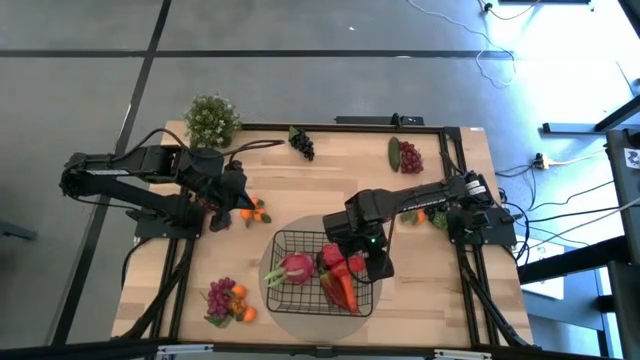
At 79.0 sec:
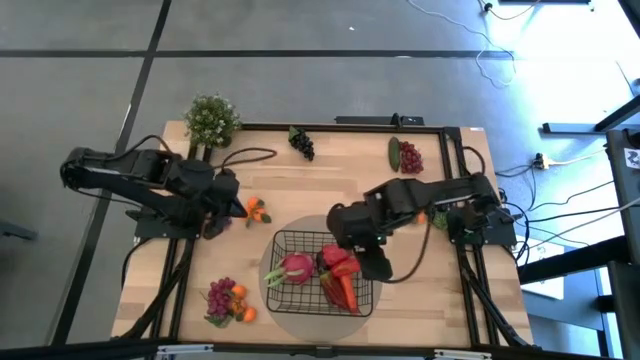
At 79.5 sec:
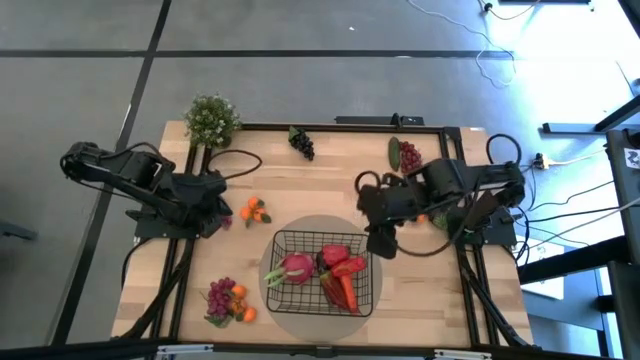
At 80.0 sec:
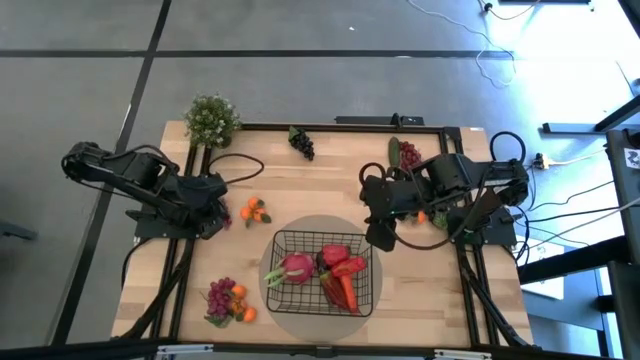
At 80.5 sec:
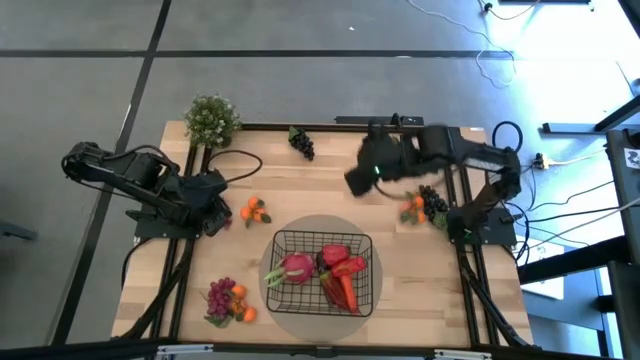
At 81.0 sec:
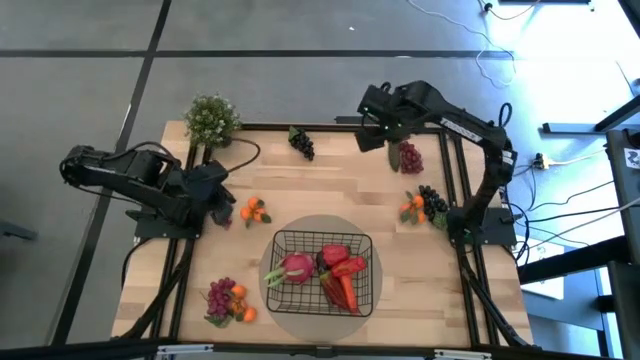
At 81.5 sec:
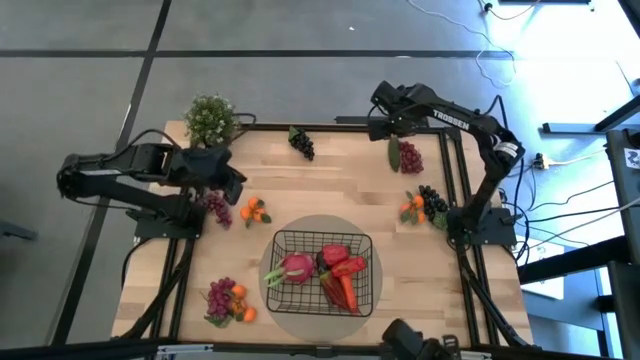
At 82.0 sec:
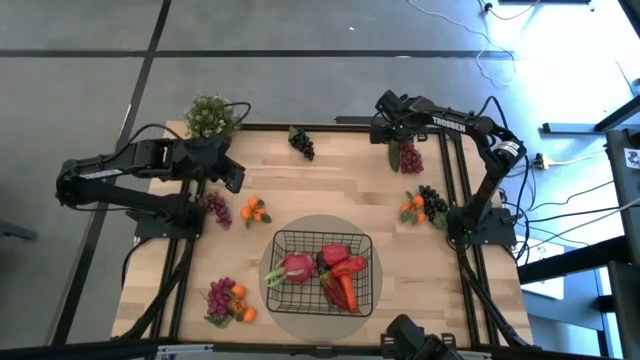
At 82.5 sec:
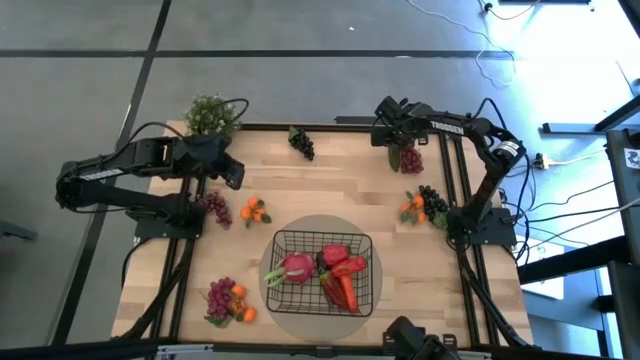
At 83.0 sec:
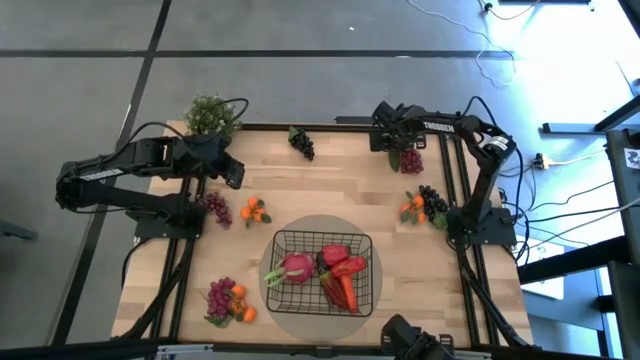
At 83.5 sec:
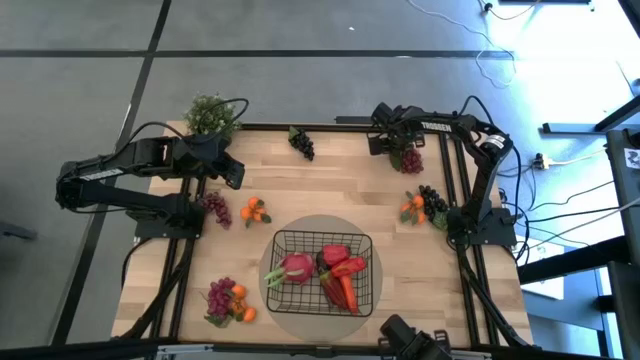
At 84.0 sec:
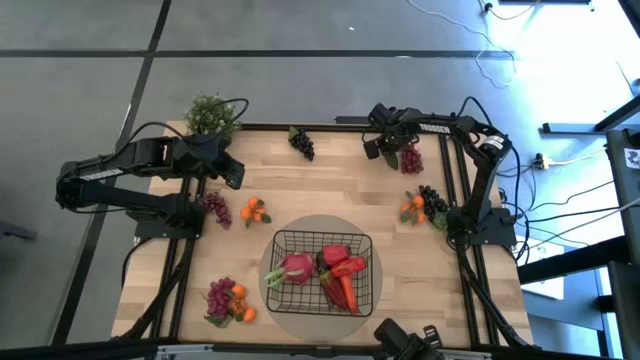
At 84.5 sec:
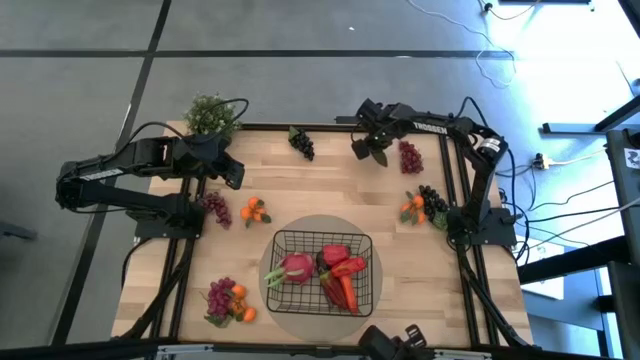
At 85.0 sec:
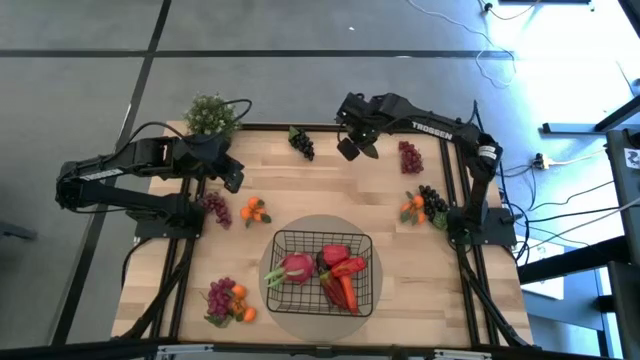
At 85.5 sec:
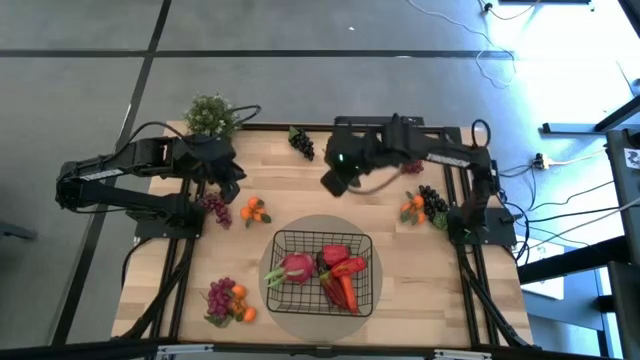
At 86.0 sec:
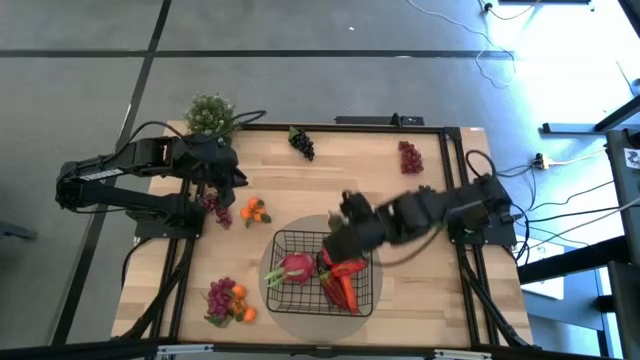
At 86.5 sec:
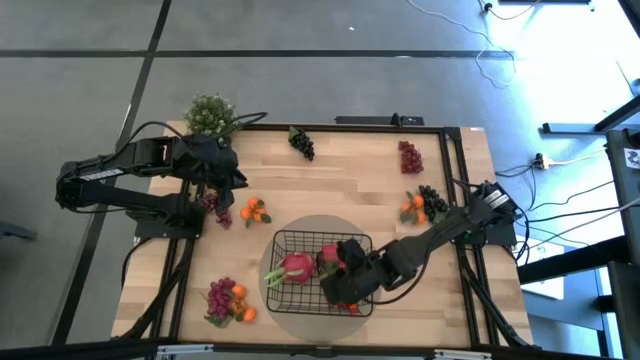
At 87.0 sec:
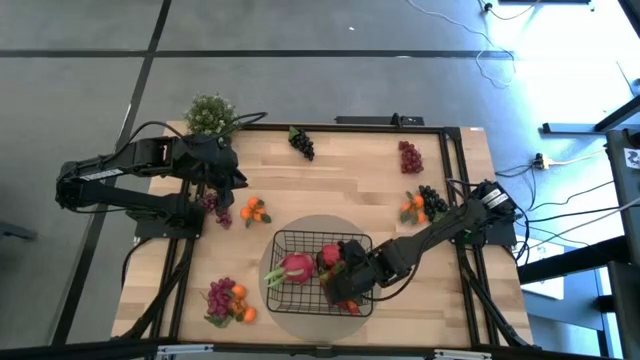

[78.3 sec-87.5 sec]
Task: Build produce basket
Put the green chili pepper into the black wire basket

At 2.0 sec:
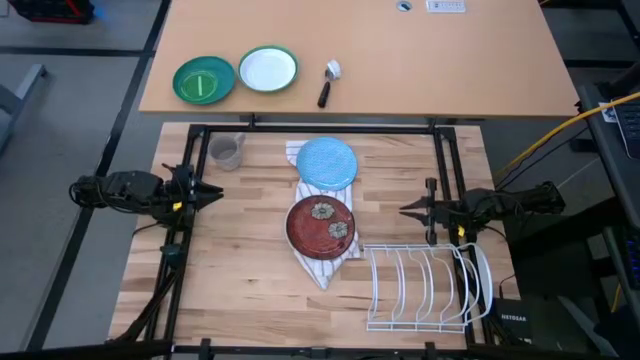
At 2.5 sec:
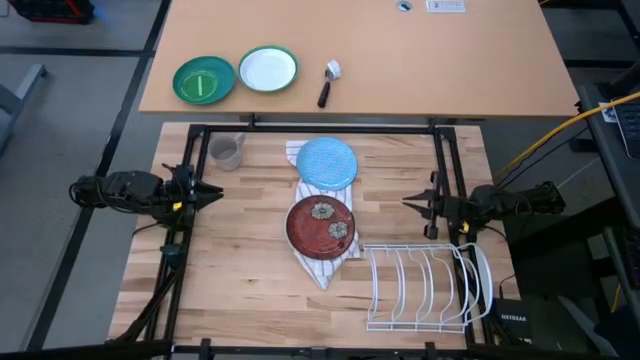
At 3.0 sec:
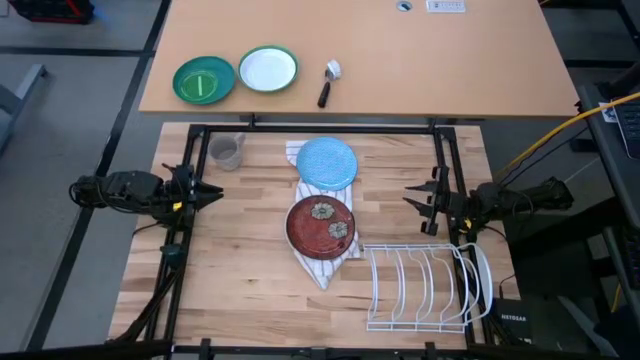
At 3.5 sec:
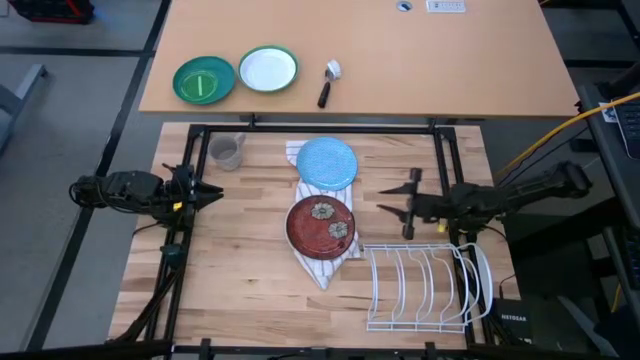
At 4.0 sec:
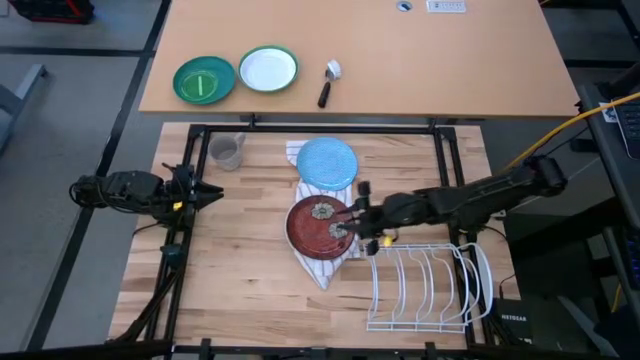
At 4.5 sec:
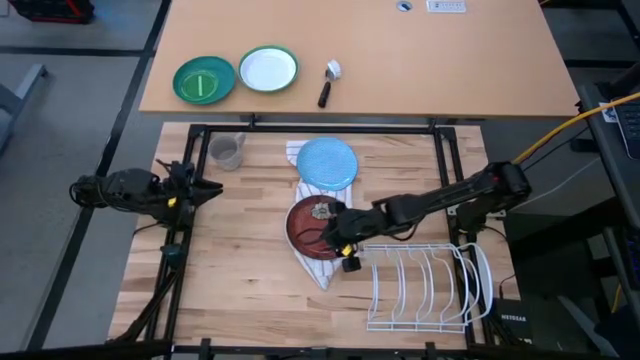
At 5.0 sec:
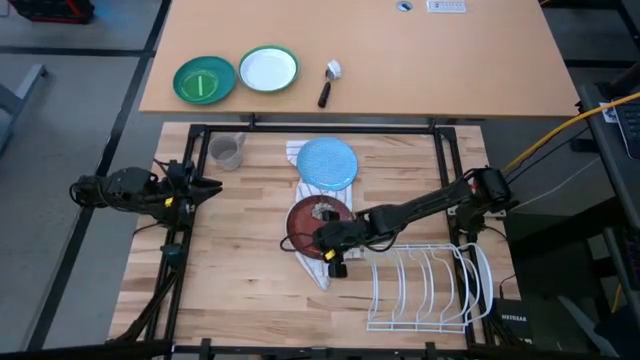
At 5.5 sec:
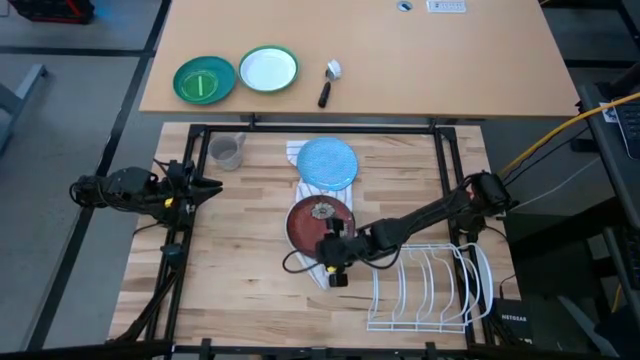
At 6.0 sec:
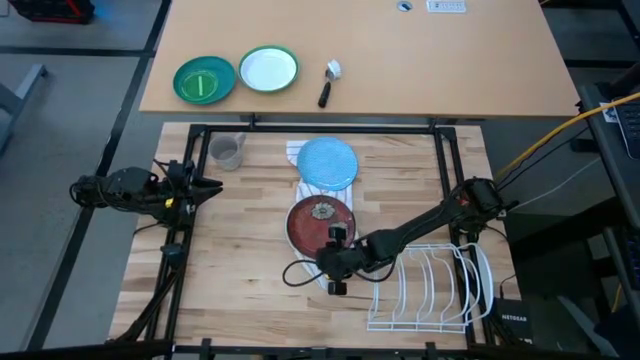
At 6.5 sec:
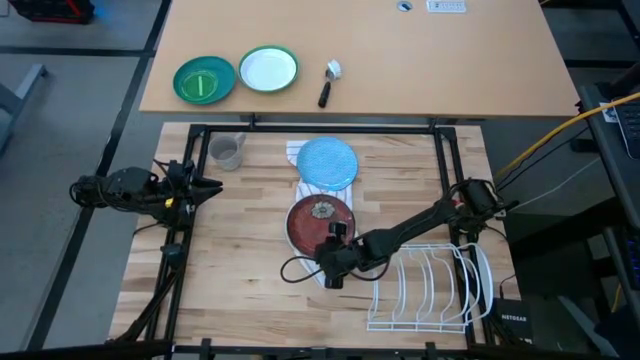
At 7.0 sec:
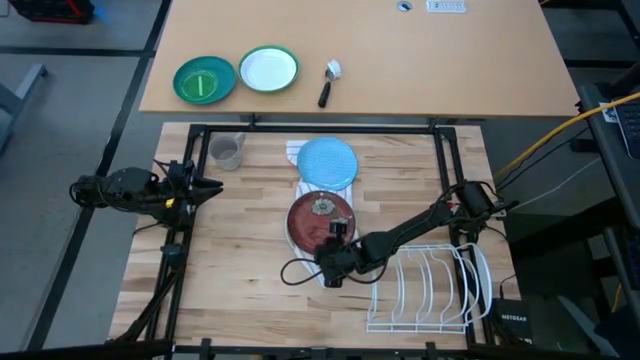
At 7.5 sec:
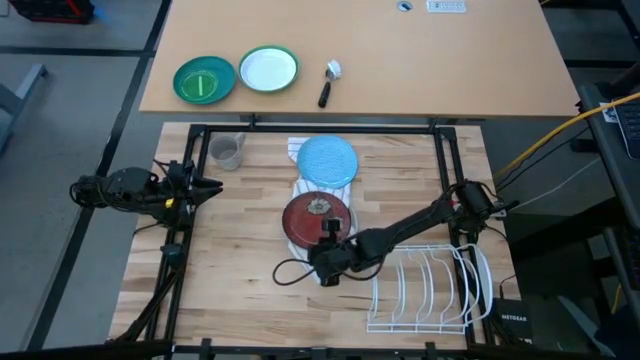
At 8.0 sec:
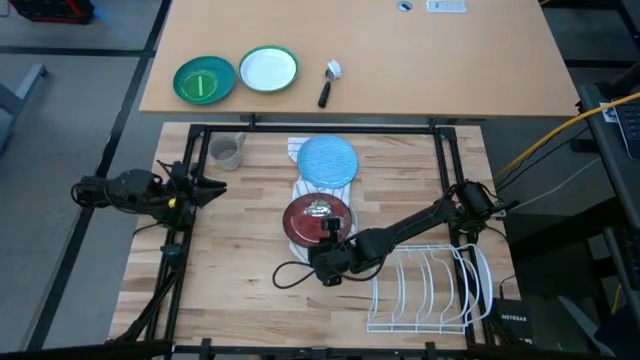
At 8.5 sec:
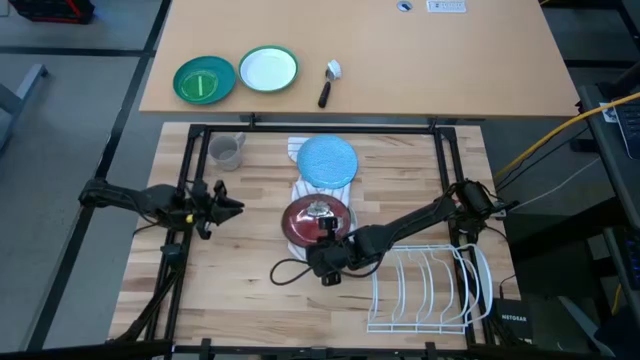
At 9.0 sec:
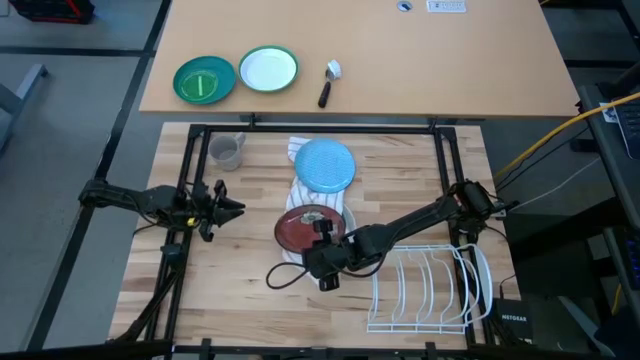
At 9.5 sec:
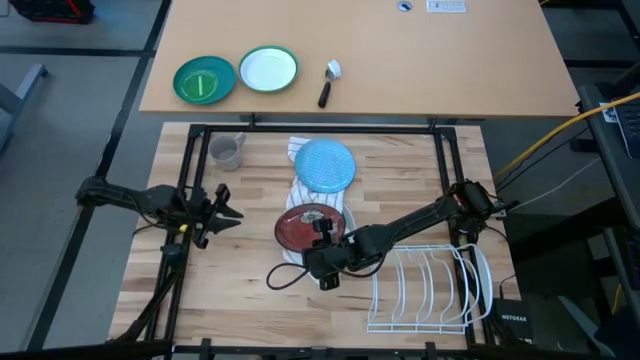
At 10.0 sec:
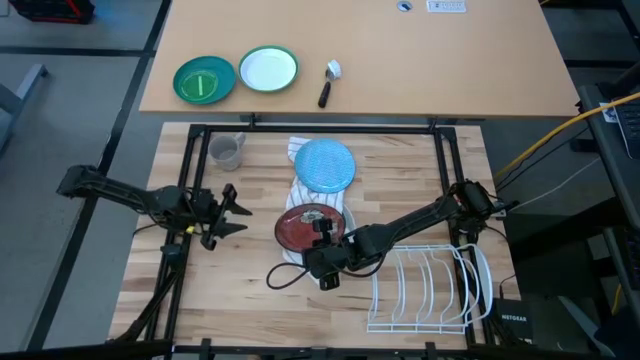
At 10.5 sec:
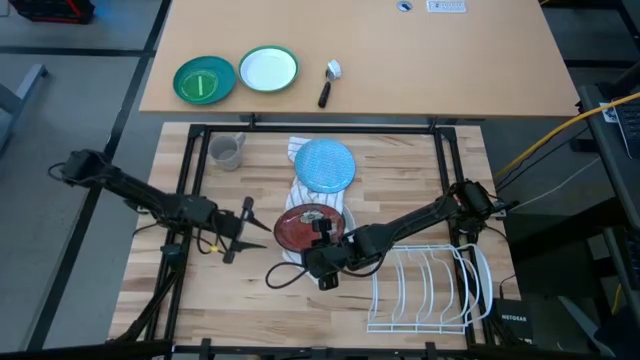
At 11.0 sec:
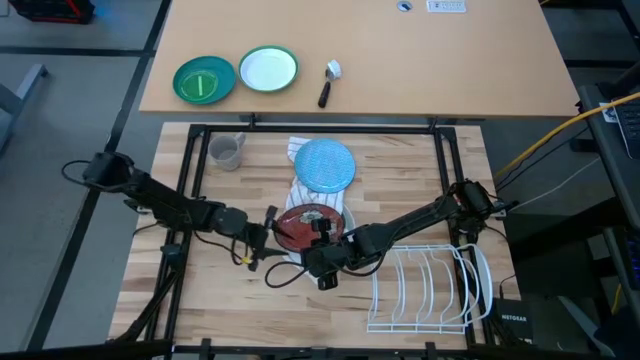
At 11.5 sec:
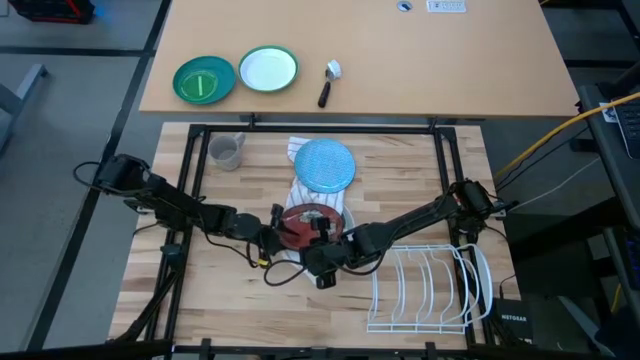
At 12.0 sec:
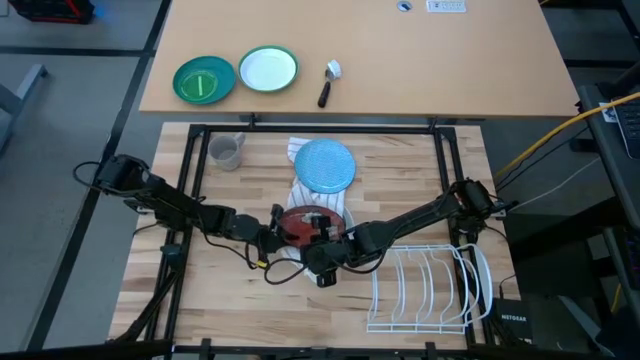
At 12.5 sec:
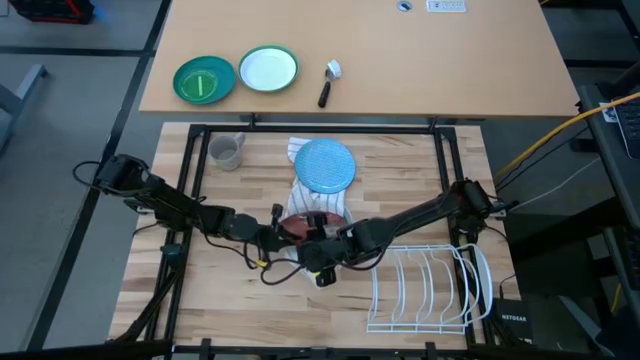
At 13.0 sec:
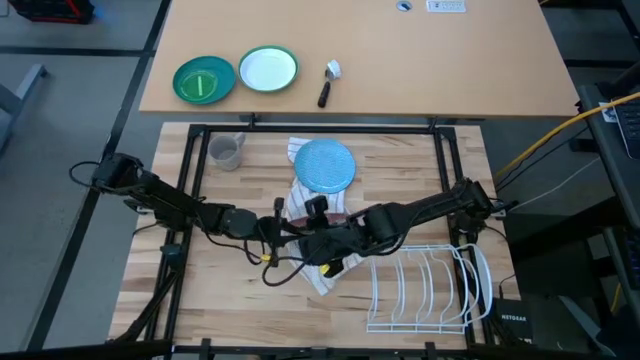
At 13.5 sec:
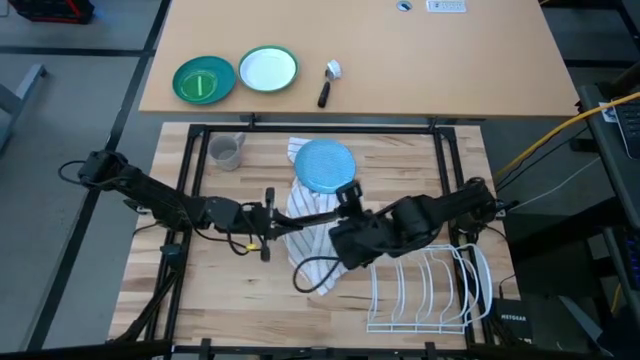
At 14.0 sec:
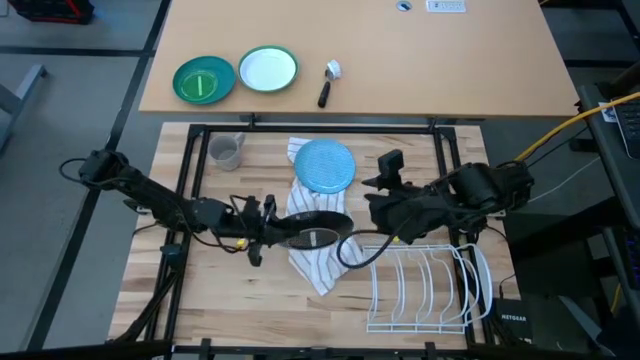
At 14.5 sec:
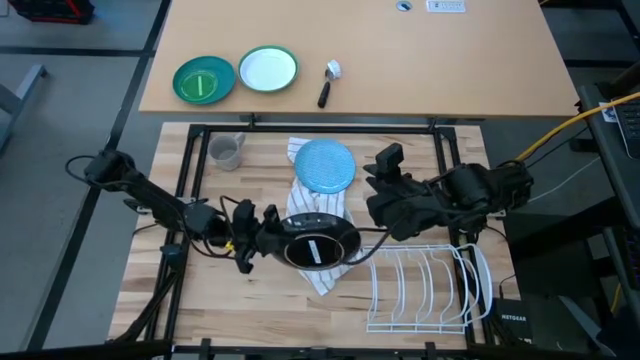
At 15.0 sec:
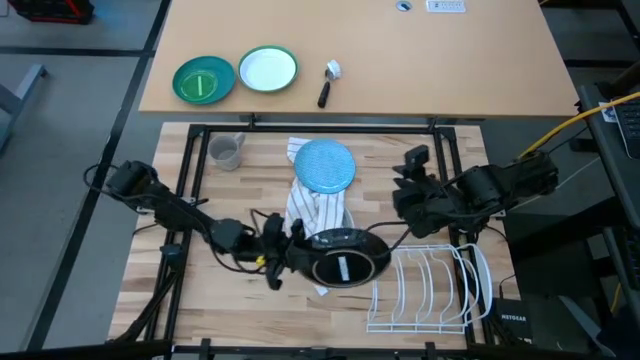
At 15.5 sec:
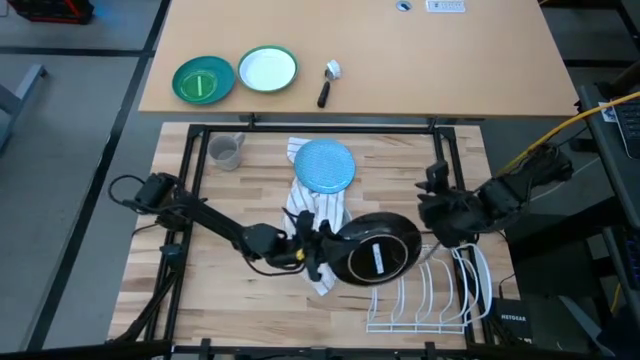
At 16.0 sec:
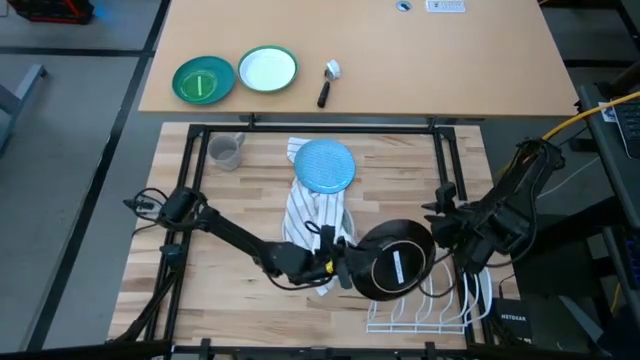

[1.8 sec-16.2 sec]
Task: Sort dishes
Put the red plate into the dish rack
